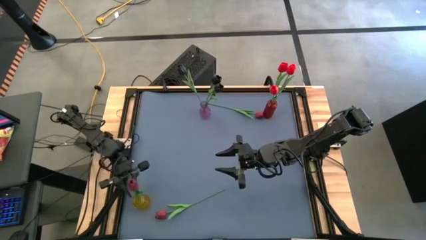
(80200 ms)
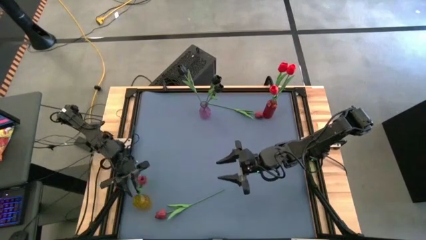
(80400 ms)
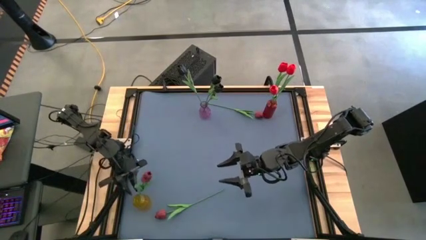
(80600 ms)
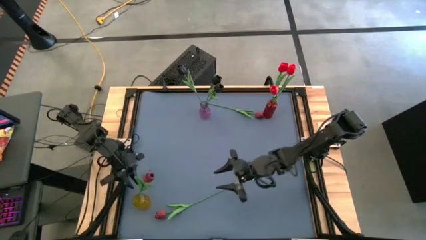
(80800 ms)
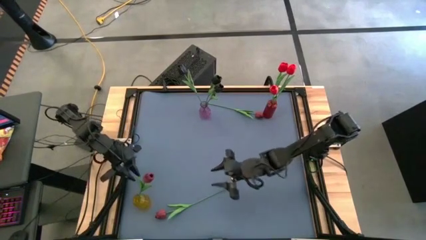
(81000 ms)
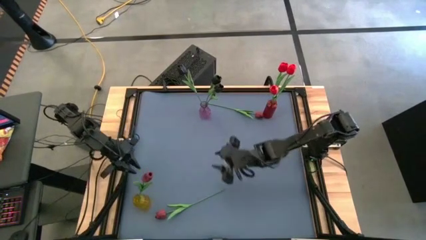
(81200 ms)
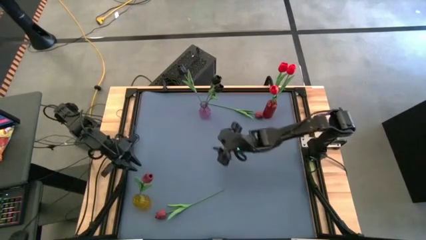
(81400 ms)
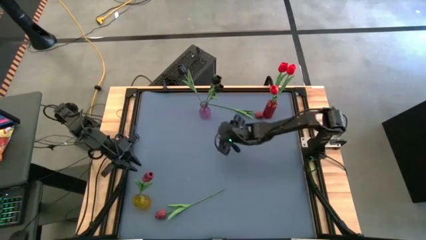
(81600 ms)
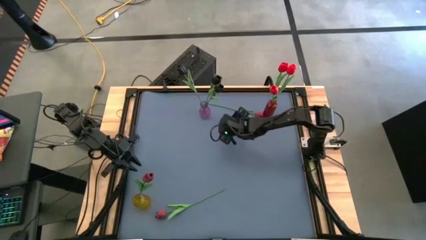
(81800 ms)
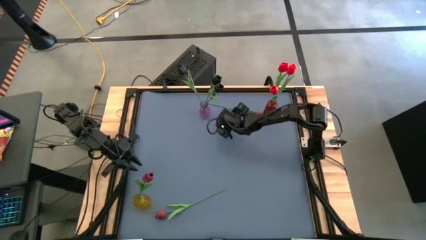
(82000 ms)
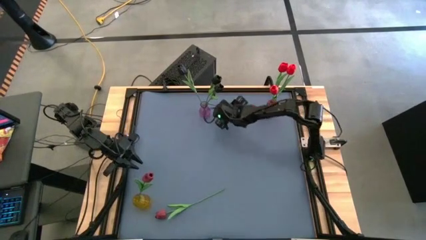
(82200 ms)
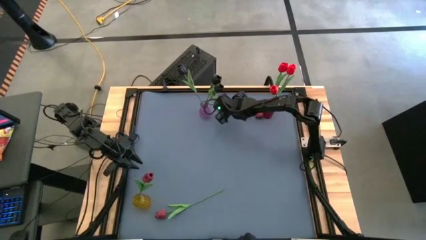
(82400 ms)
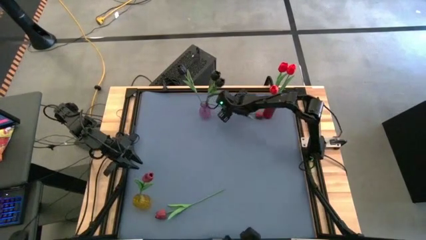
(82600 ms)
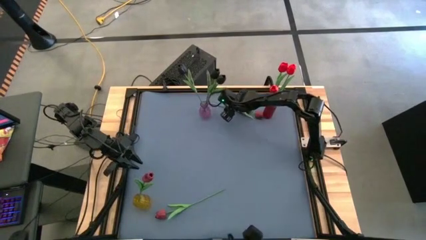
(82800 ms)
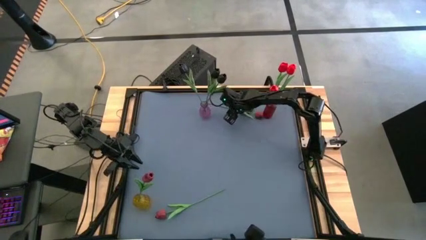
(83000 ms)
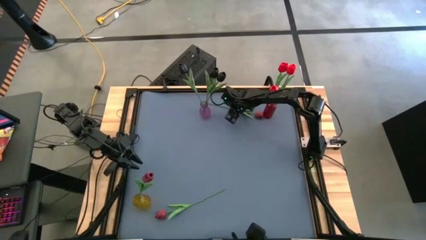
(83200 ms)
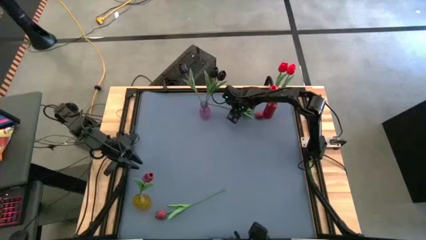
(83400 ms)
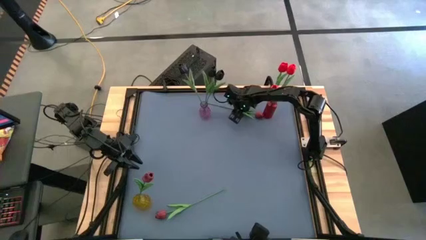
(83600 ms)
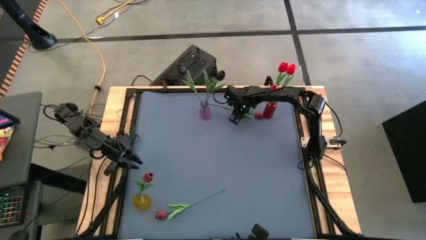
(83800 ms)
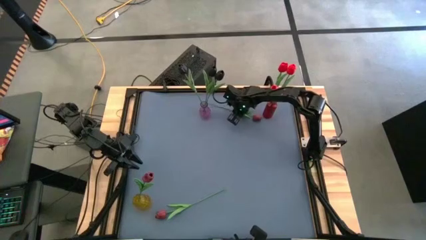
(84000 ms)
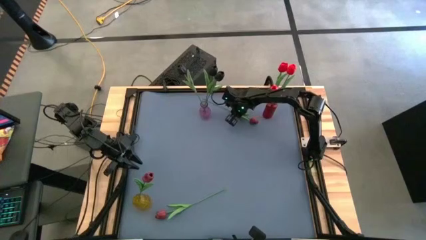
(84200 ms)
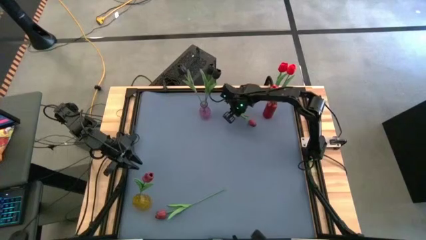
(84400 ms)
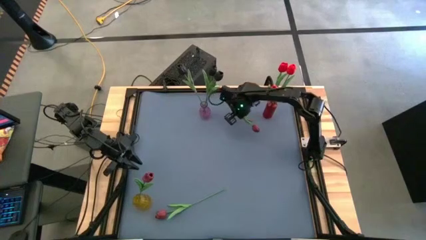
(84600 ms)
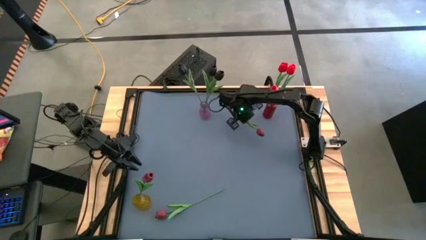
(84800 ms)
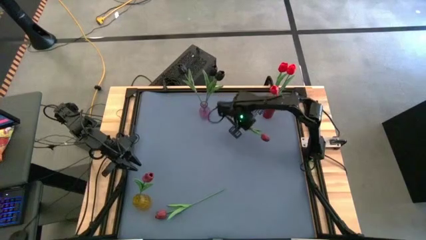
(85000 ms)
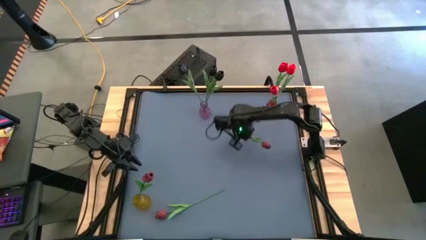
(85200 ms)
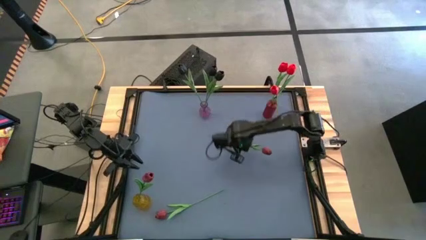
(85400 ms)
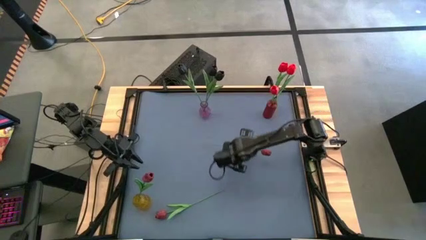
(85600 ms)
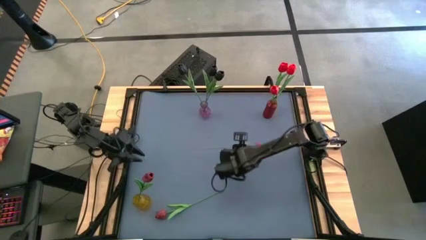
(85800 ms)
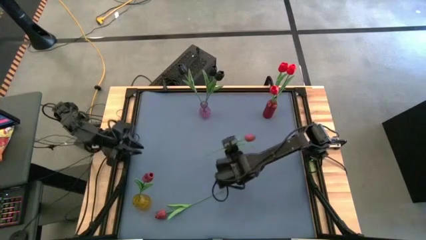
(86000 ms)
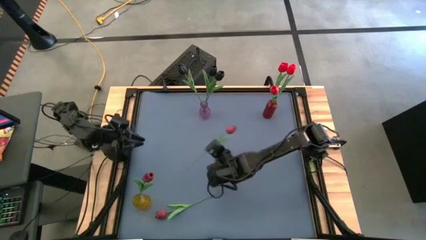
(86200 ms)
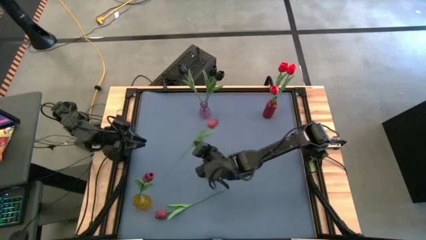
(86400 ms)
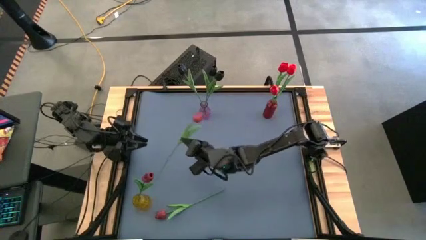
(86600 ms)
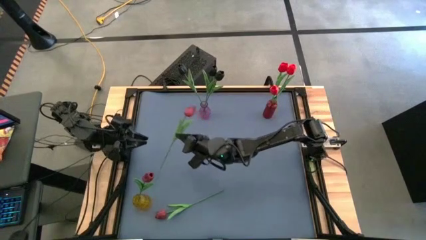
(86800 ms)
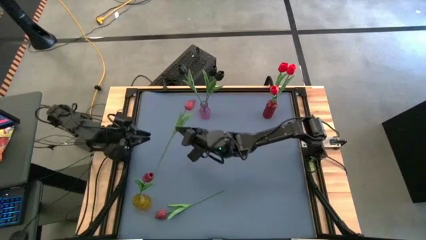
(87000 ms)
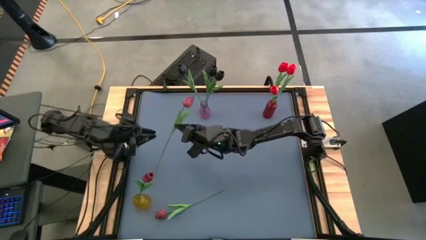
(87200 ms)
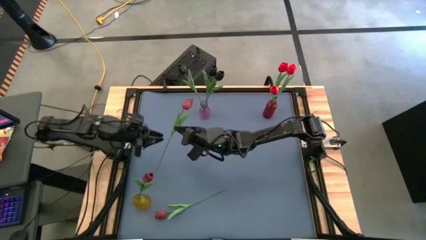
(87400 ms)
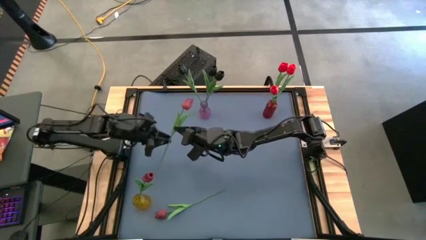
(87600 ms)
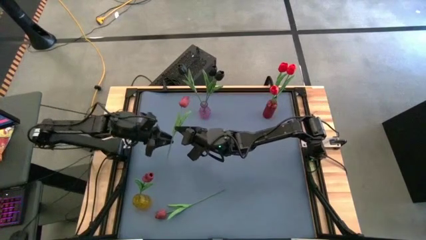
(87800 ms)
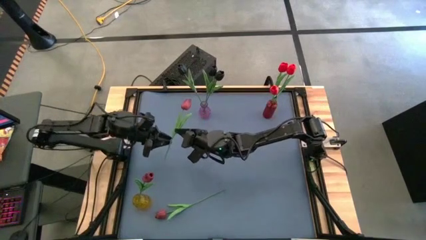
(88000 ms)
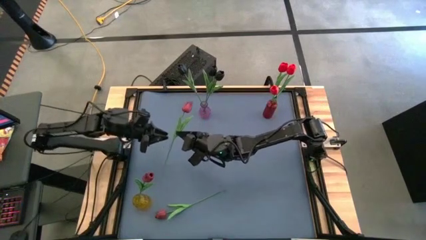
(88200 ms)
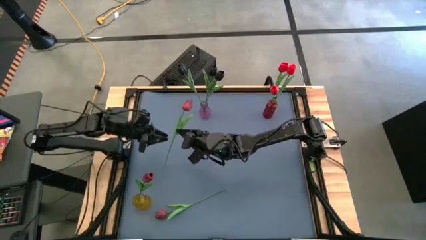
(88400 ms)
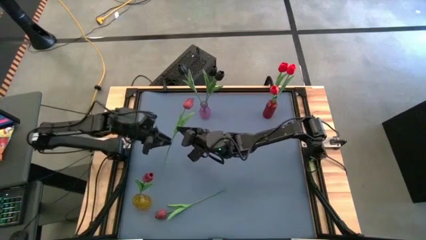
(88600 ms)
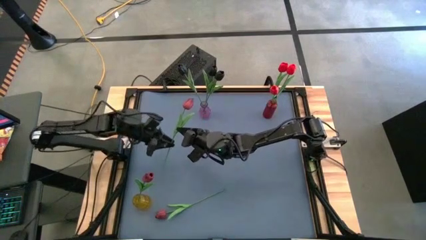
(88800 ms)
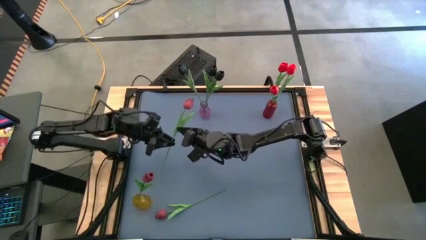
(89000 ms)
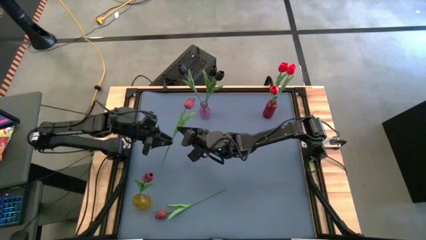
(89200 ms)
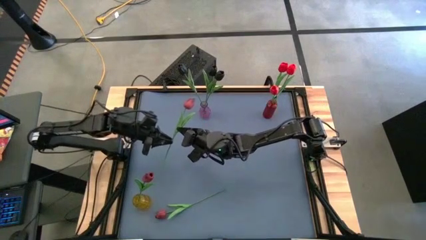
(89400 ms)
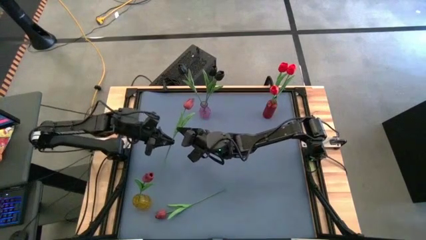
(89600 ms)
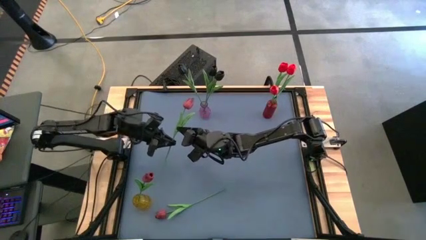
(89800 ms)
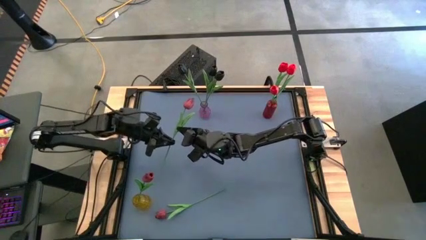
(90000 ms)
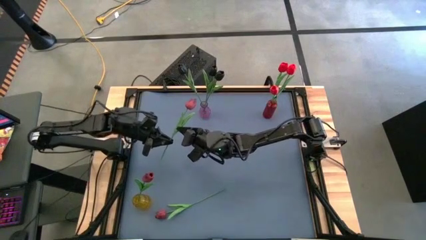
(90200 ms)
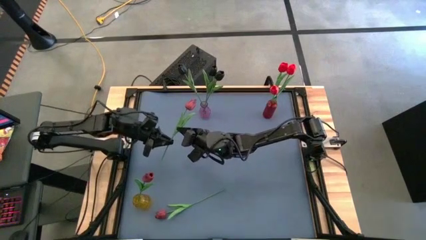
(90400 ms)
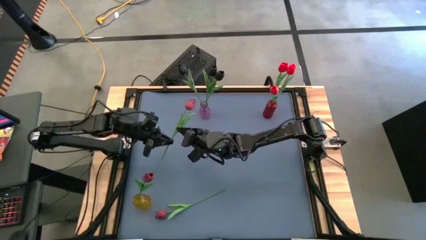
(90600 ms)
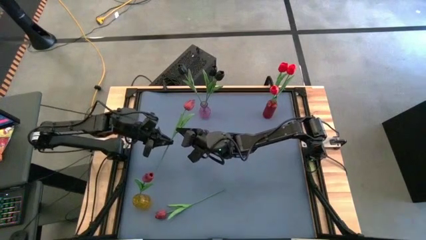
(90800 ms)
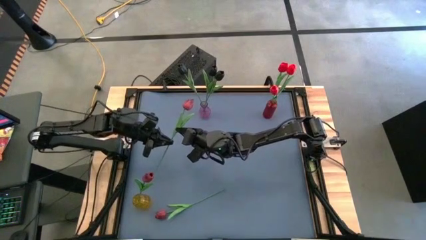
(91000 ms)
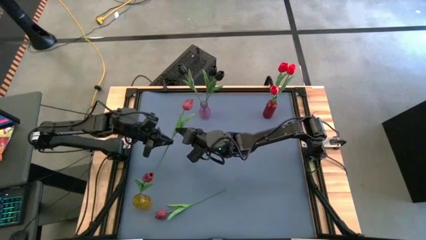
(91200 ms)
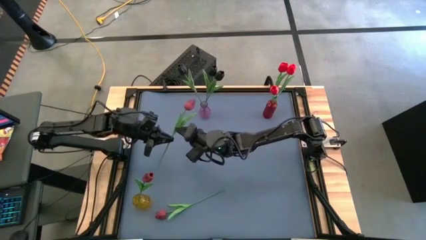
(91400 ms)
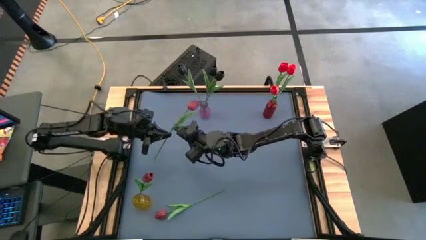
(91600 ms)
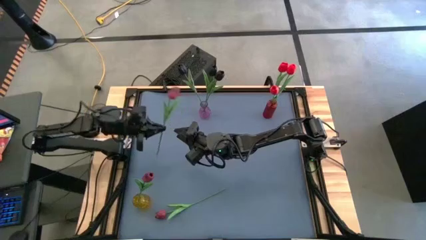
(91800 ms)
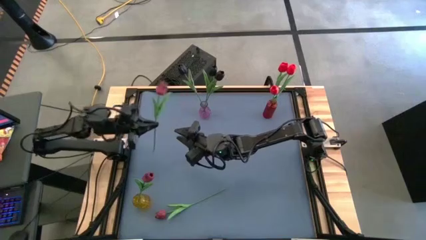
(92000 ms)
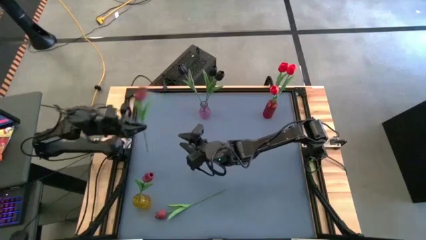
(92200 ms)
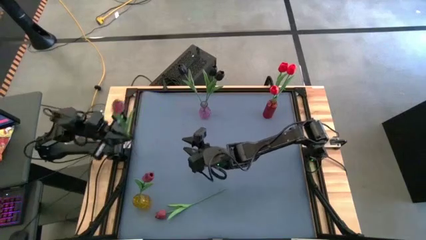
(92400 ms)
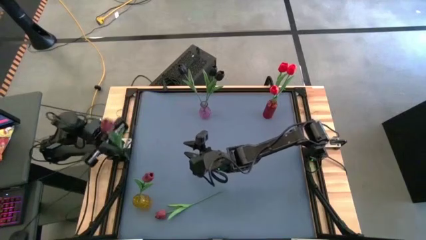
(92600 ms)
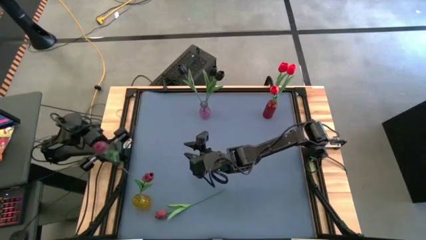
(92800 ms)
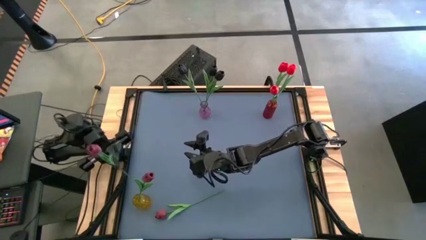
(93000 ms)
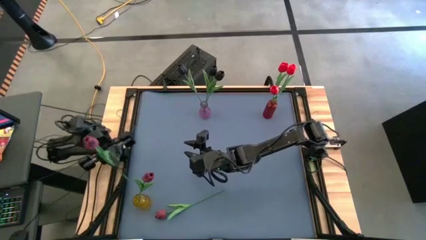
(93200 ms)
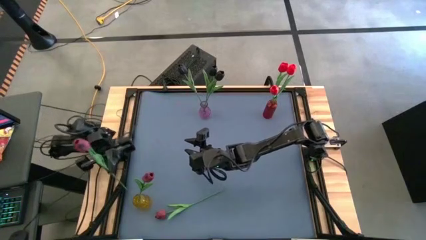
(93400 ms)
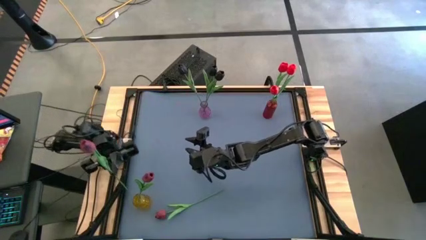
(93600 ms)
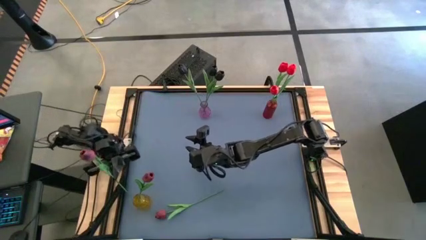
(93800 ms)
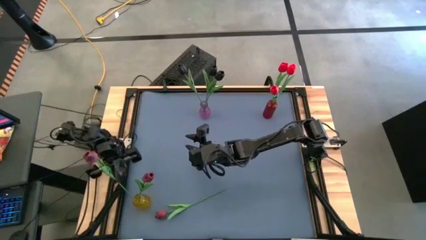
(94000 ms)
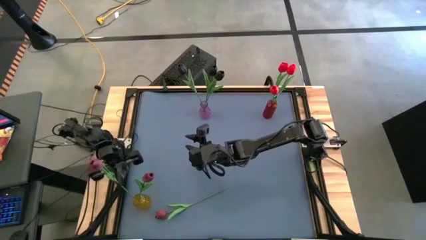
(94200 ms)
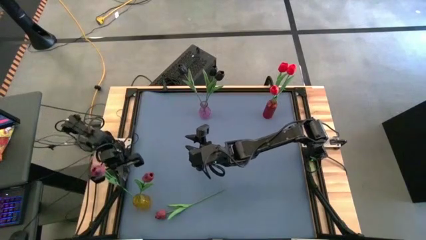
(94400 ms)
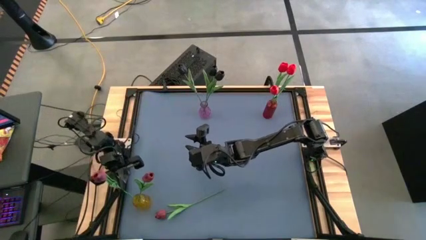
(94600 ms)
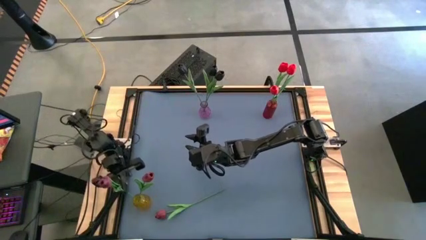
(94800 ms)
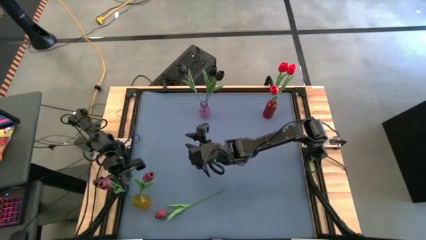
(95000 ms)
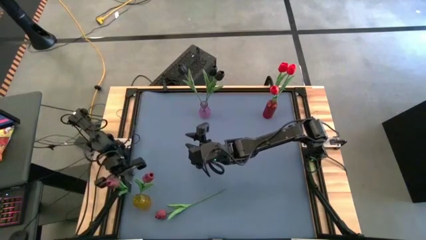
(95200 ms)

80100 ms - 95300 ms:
Task: Sort flowers into vase by color
Put the top dark red flower into the yellow vase
